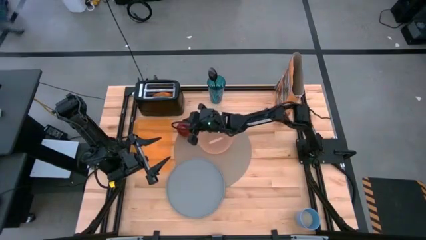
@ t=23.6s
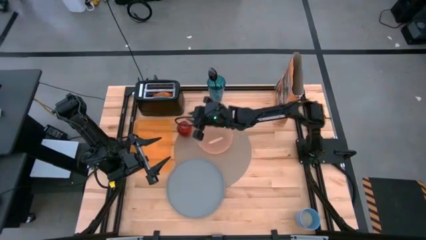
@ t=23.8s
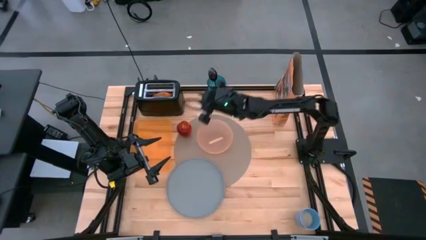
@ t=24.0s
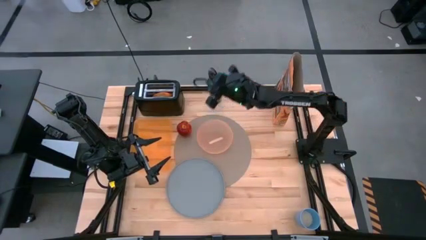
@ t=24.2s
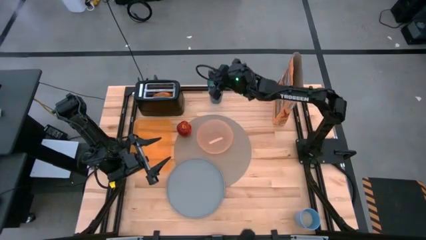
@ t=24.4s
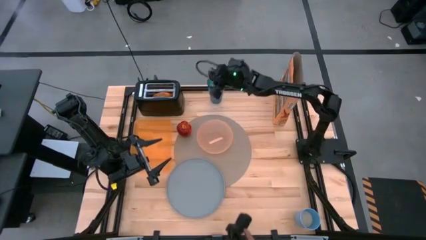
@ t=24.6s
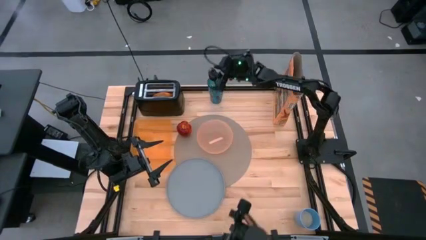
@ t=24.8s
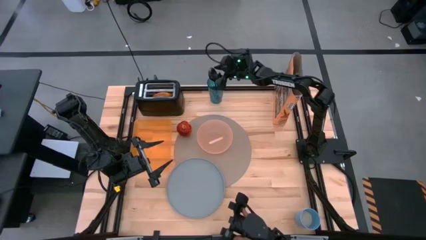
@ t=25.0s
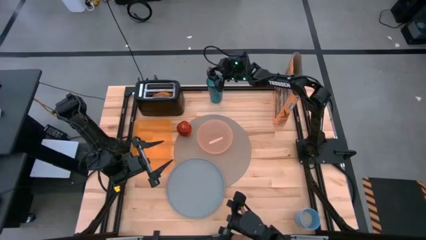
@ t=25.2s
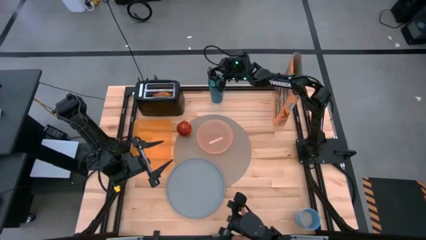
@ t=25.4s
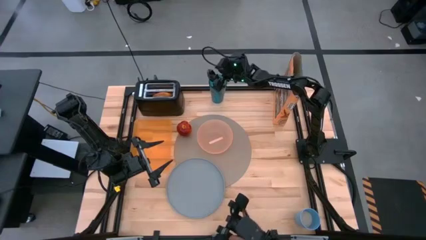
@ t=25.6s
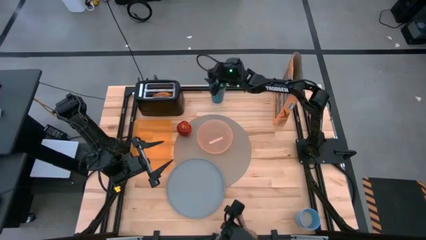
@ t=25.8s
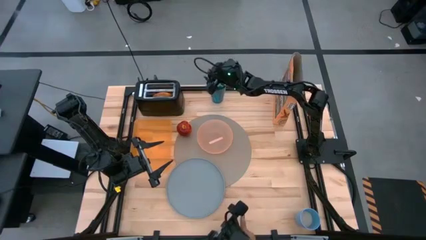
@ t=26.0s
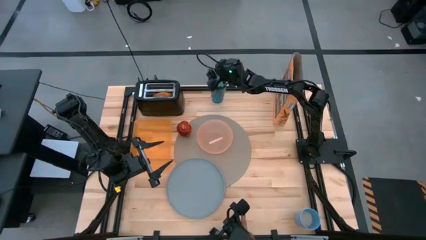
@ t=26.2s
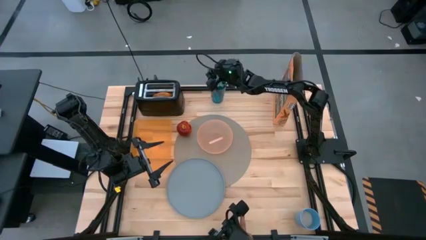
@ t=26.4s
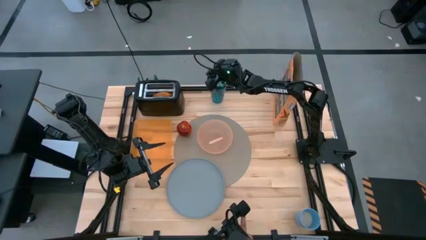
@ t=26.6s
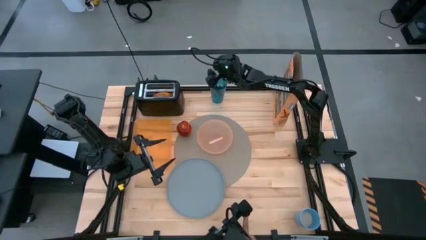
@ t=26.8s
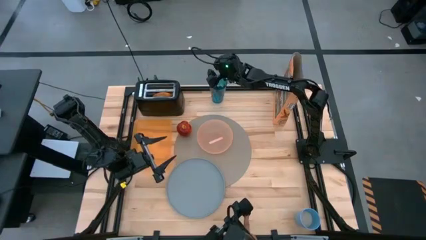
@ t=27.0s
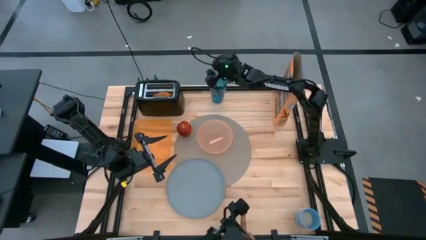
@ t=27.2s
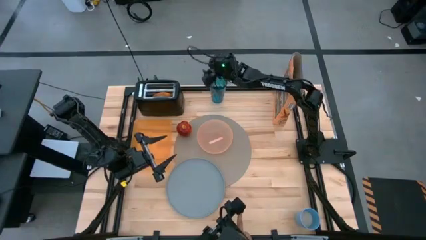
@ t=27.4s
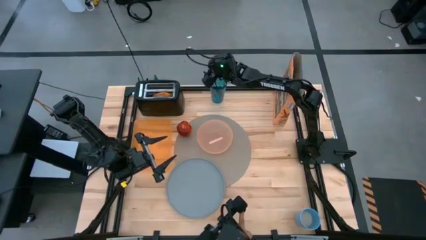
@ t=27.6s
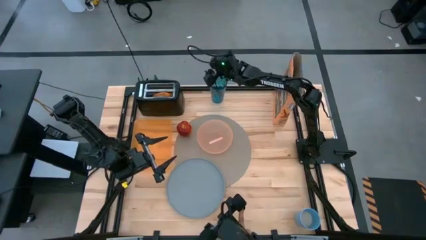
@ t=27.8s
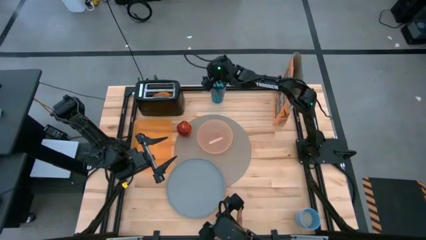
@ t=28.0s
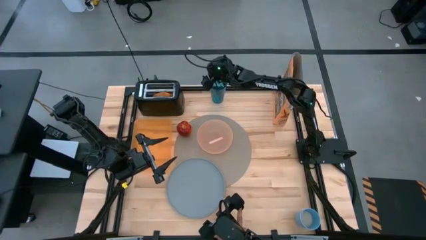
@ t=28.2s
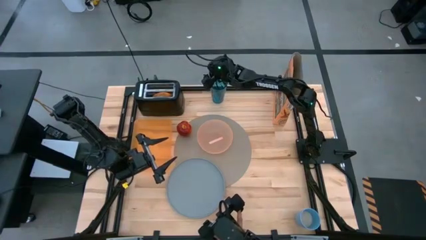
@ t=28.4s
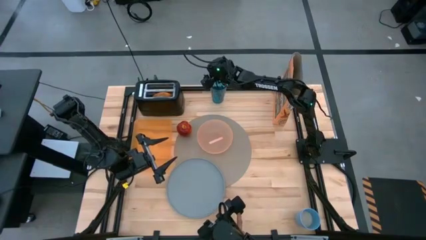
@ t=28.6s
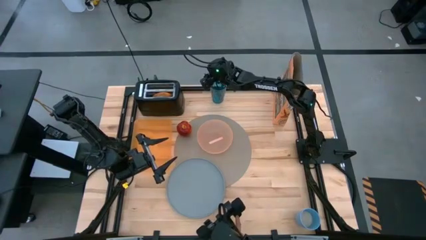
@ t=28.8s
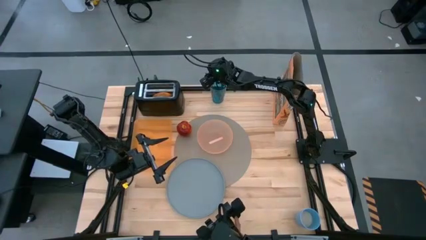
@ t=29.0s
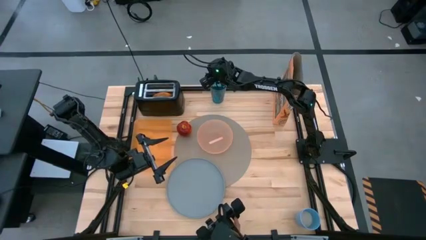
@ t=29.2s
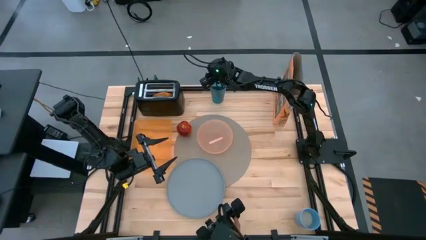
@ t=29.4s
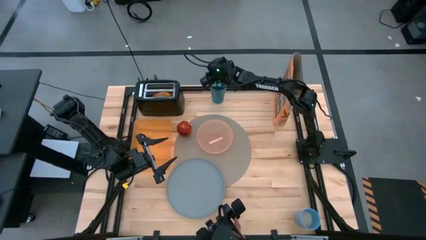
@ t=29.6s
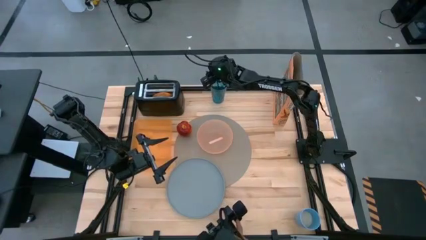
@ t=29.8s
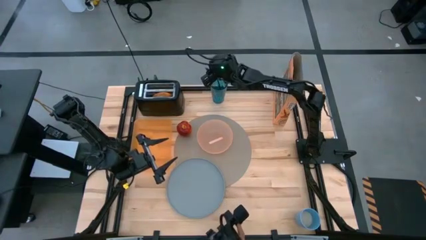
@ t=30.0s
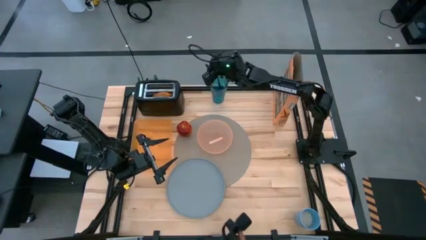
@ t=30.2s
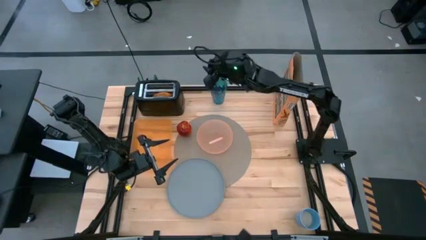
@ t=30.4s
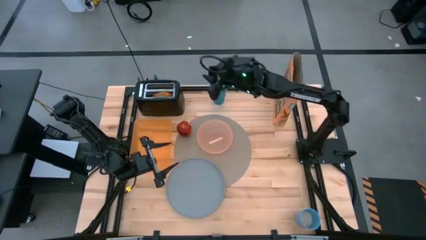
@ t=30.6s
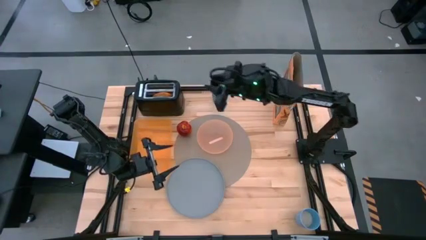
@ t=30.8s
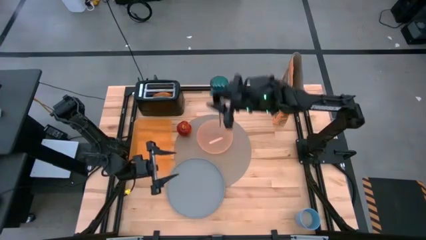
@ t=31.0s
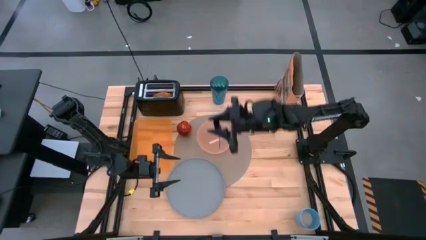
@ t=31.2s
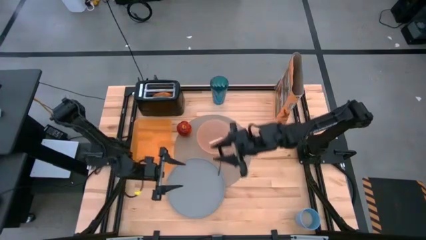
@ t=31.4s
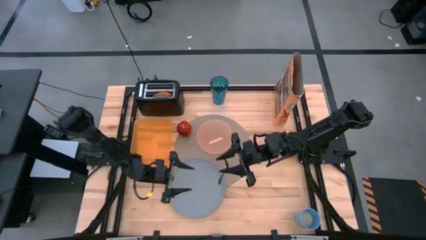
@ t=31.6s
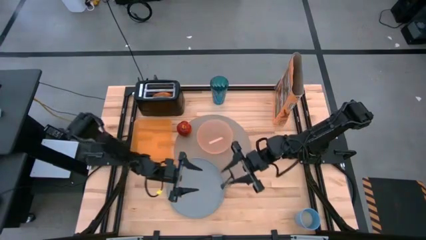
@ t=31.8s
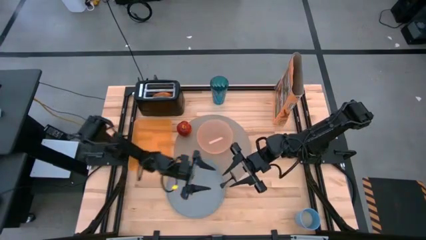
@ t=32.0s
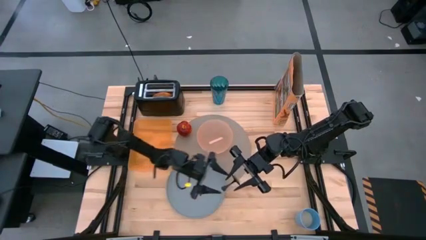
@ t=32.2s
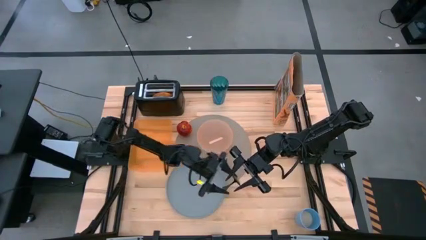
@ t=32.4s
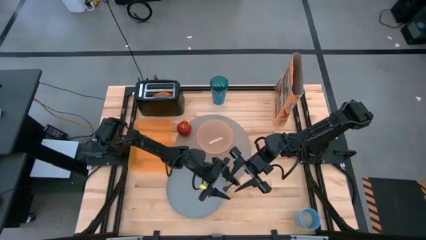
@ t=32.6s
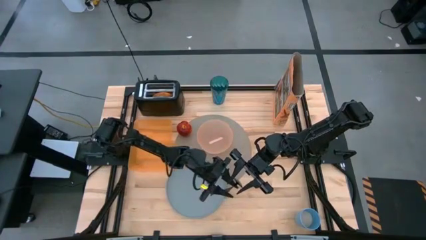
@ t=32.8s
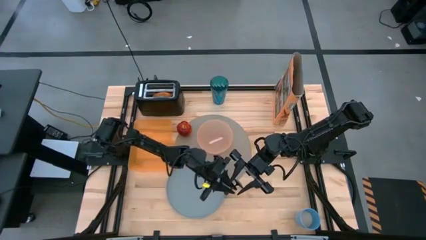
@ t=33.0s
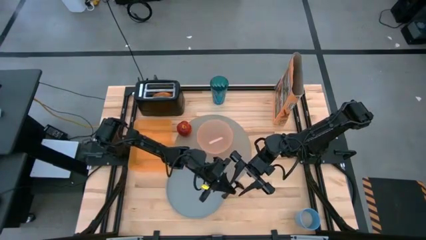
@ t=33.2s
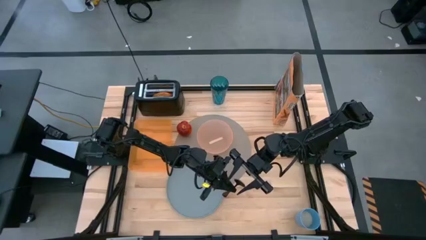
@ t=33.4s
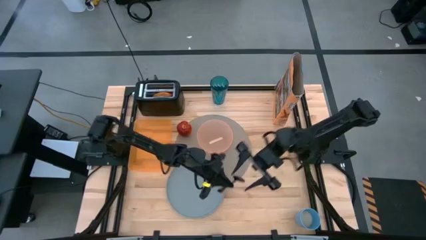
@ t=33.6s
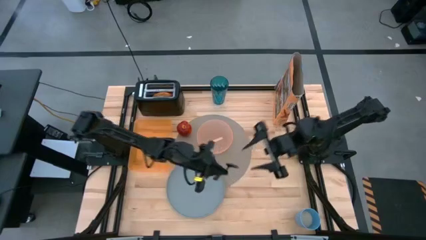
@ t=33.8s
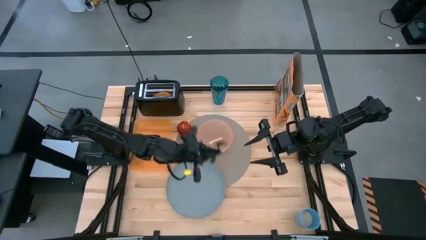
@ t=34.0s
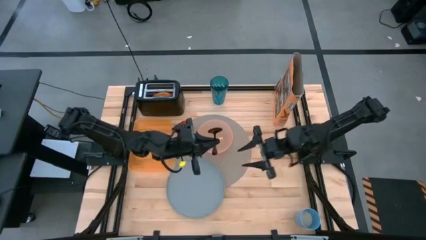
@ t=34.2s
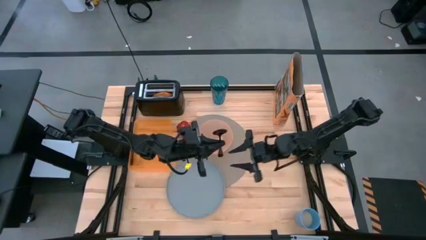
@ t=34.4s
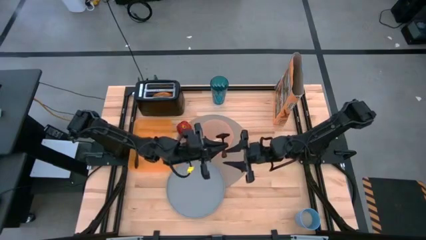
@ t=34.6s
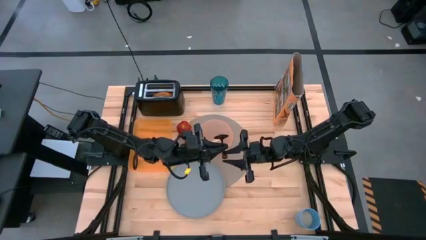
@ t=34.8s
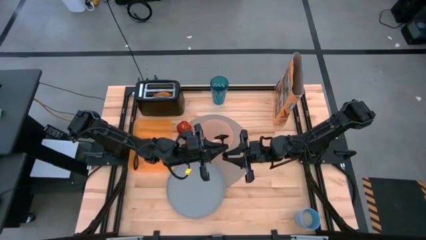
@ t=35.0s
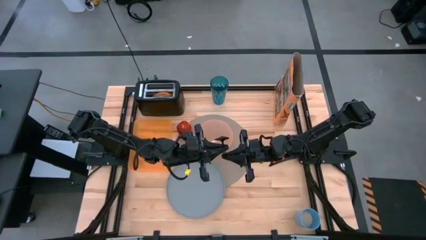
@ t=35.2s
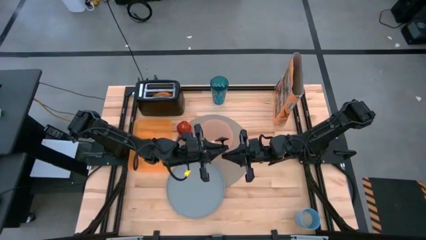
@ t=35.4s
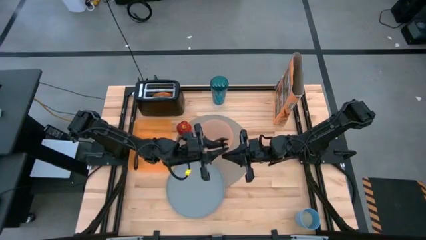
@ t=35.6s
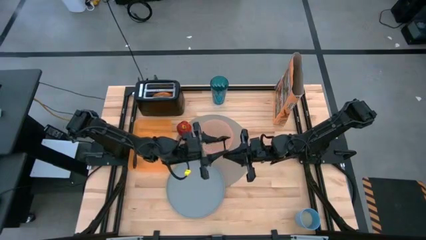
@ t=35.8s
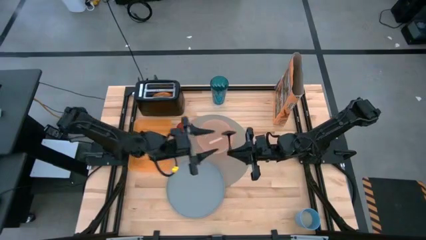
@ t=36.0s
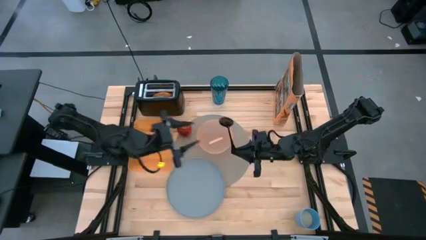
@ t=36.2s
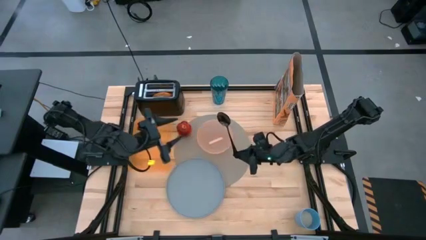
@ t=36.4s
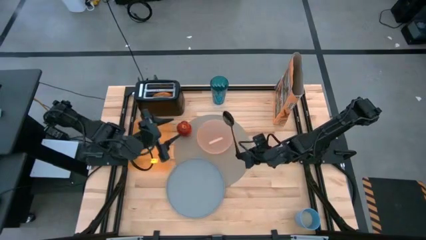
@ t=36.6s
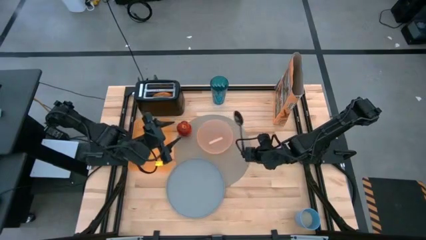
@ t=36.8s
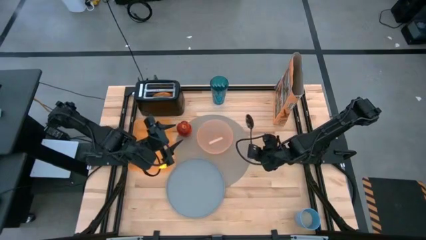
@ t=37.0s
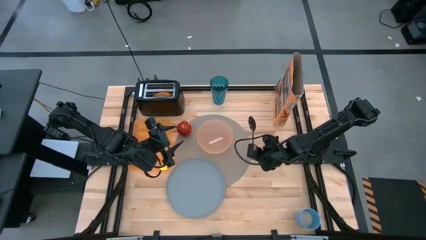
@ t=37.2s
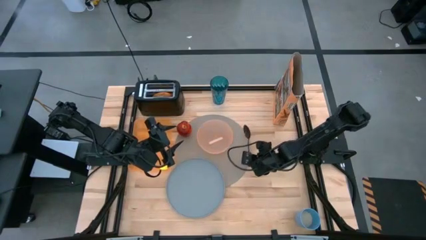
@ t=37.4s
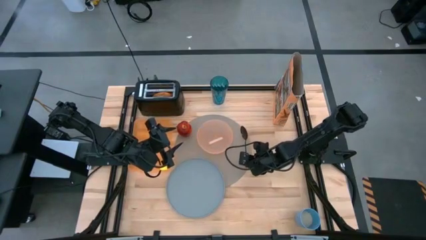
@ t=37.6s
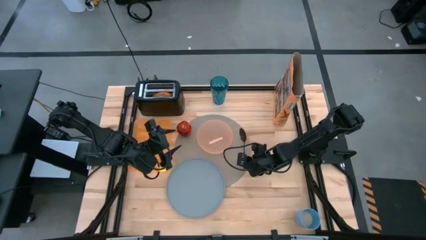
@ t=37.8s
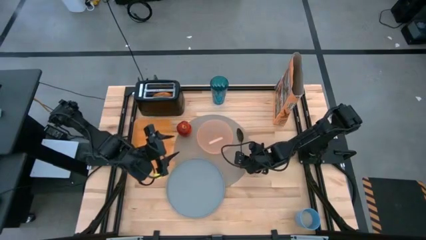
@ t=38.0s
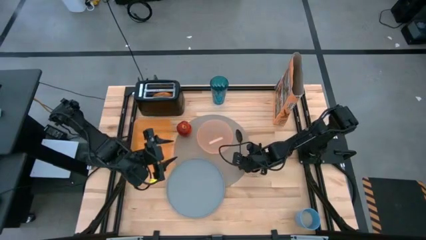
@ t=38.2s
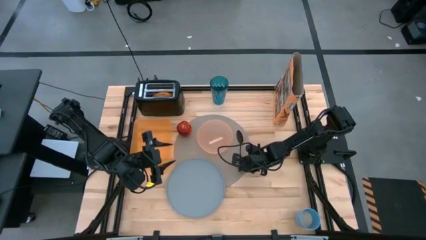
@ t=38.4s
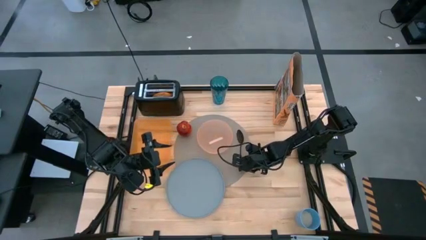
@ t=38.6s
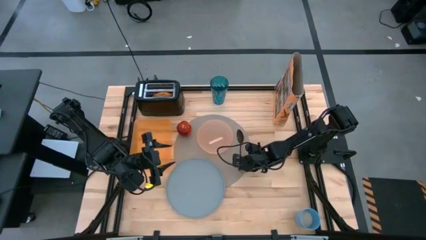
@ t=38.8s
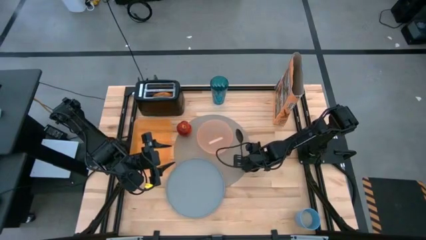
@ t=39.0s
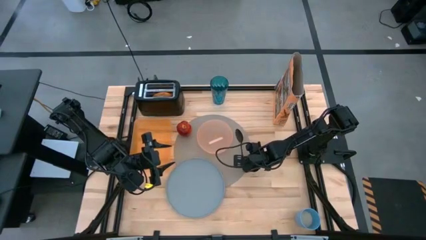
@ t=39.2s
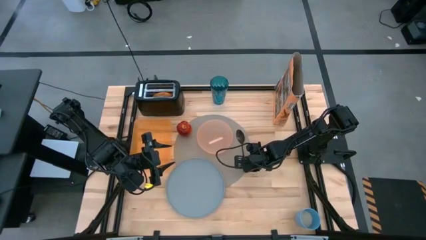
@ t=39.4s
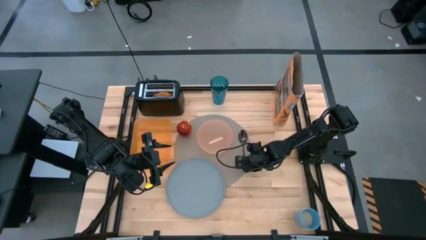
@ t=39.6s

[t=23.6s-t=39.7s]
Task: Arrange a breakfast setting
Put the black spoon on the gray placemat to the right of the orange bowl

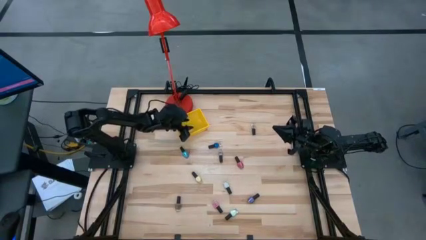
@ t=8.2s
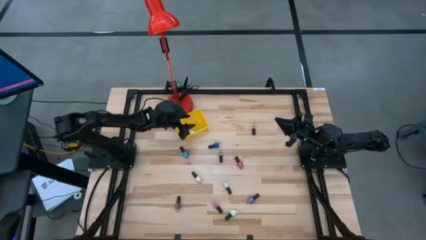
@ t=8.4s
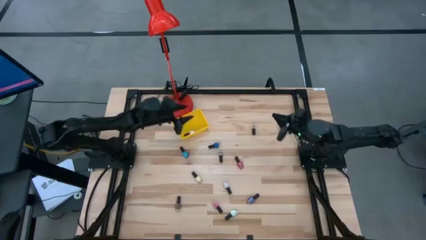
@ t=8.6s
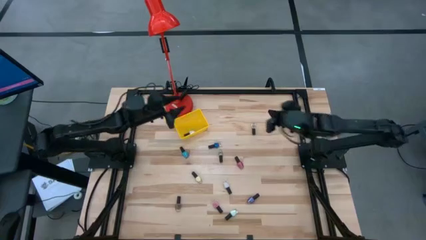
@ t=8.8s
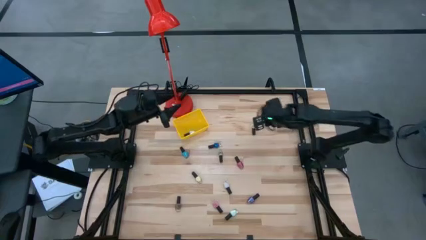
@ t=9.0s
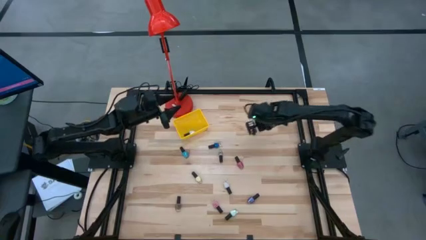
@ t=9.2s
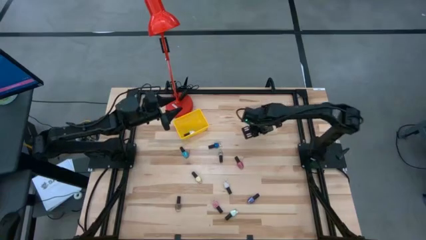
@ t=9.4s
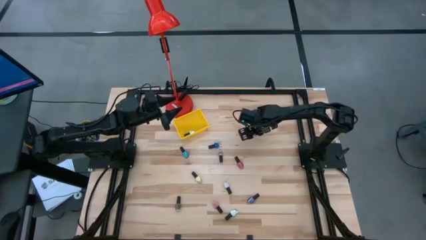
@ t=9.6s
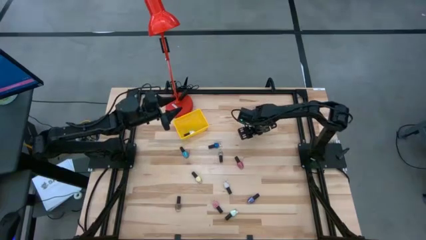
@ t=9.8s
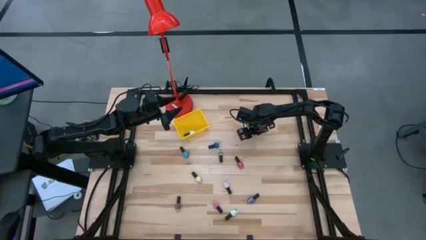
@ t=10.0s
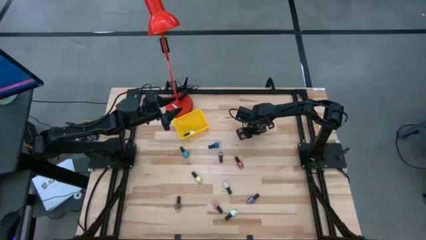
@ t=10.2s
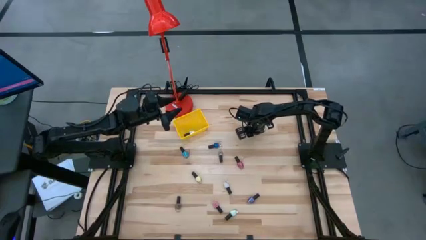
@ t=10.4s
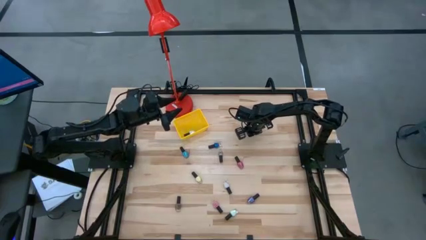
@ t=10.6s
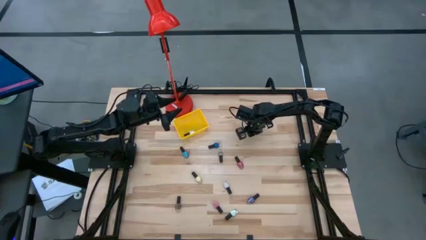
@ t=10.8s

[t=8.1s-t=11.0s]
Task: Pick & Place Nail Polish
Put the transparent nail polish into the yellow basket
